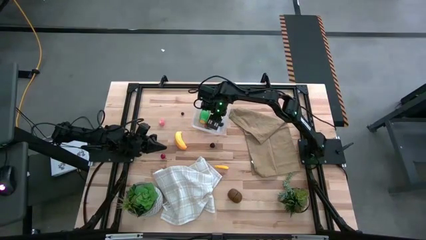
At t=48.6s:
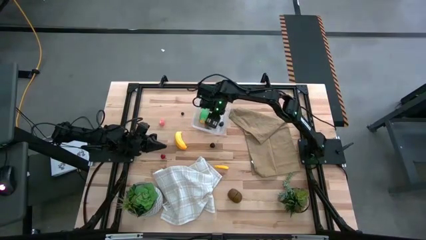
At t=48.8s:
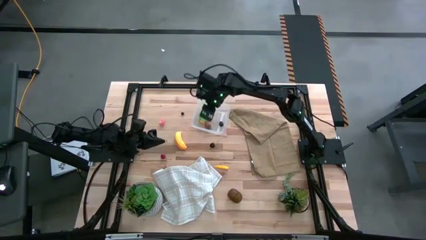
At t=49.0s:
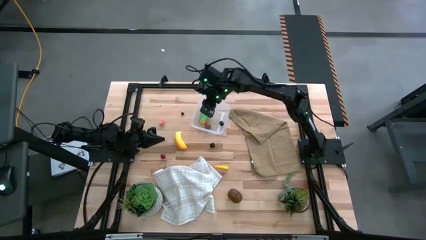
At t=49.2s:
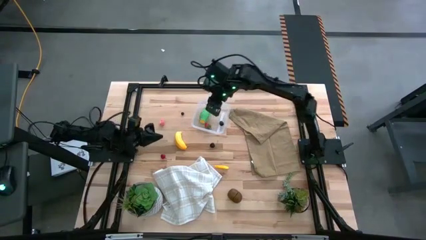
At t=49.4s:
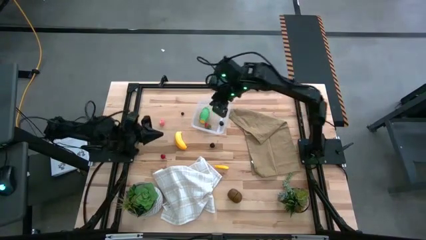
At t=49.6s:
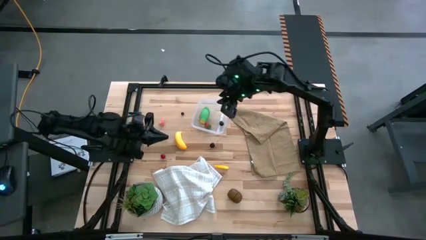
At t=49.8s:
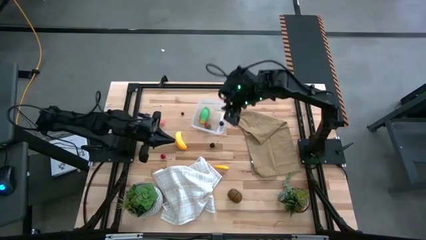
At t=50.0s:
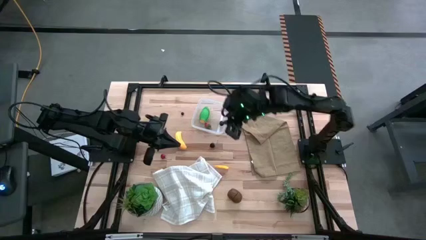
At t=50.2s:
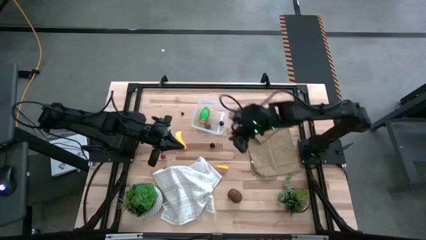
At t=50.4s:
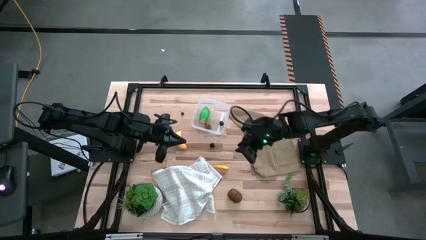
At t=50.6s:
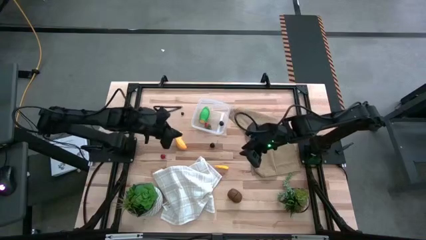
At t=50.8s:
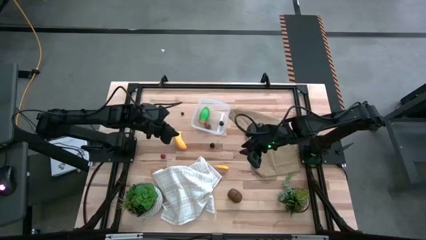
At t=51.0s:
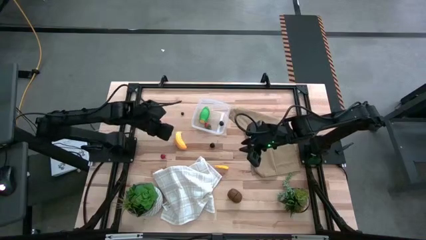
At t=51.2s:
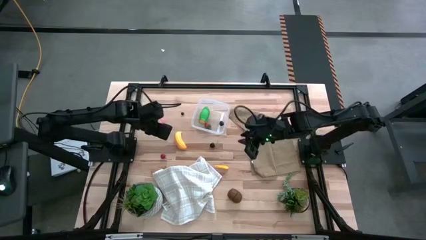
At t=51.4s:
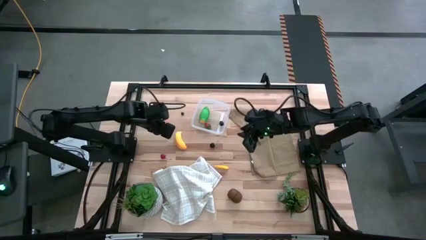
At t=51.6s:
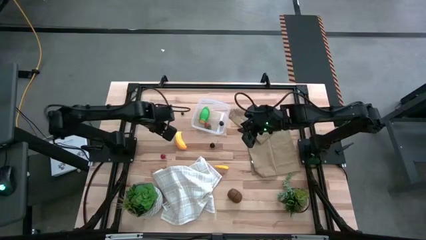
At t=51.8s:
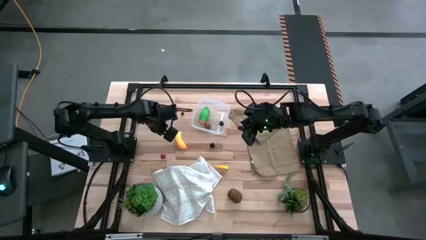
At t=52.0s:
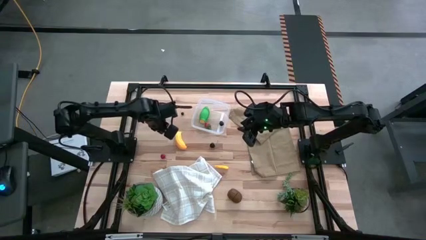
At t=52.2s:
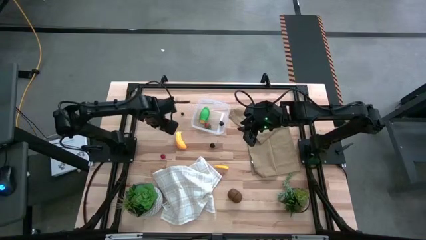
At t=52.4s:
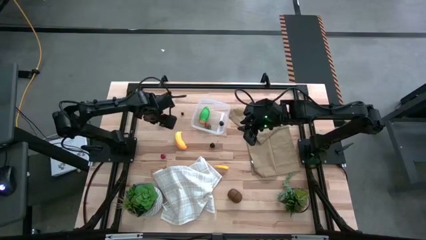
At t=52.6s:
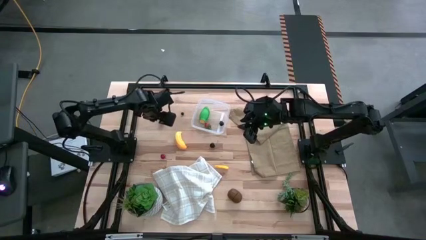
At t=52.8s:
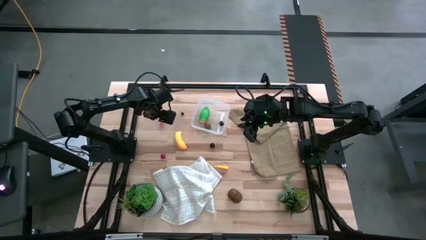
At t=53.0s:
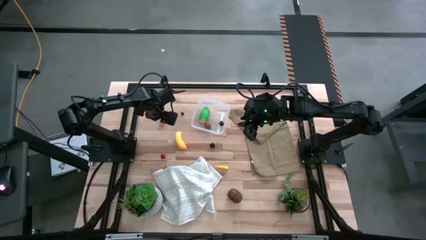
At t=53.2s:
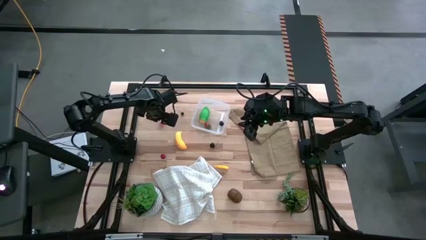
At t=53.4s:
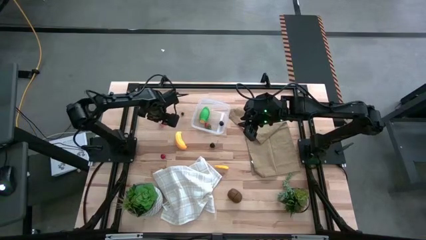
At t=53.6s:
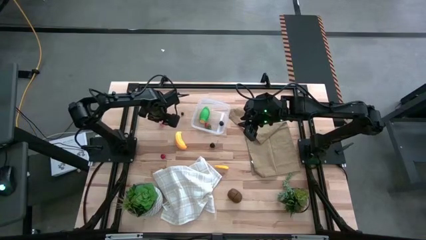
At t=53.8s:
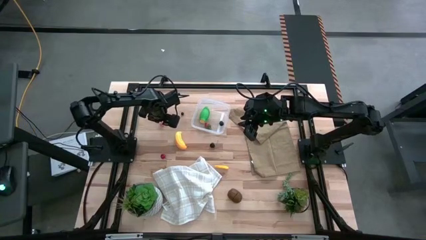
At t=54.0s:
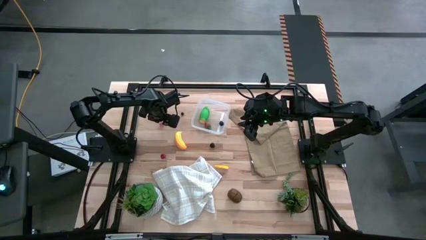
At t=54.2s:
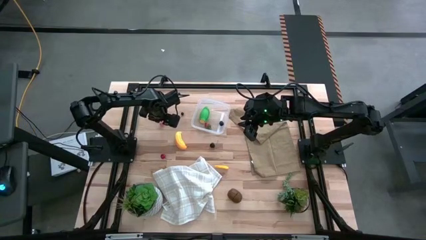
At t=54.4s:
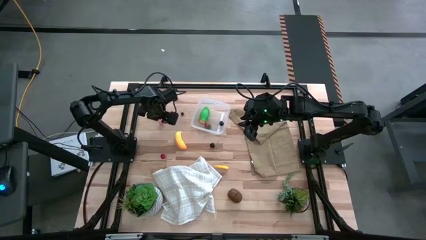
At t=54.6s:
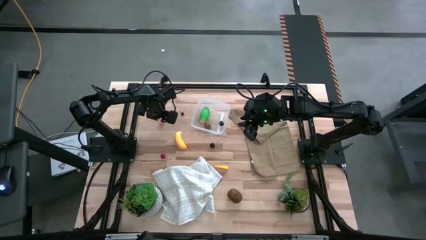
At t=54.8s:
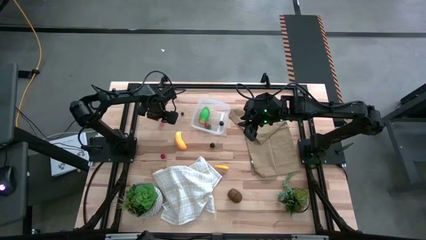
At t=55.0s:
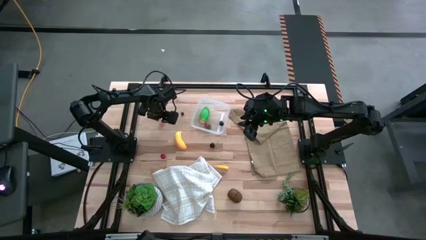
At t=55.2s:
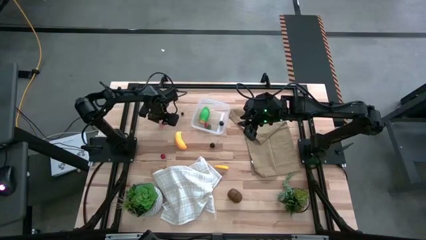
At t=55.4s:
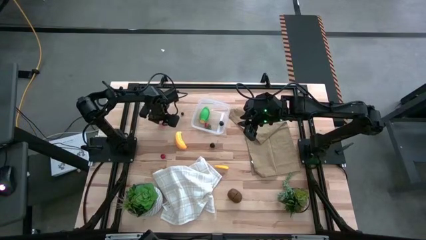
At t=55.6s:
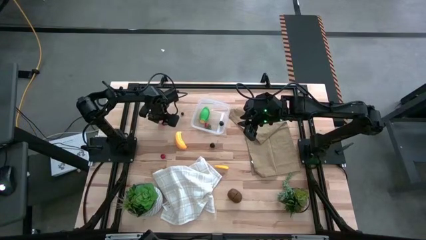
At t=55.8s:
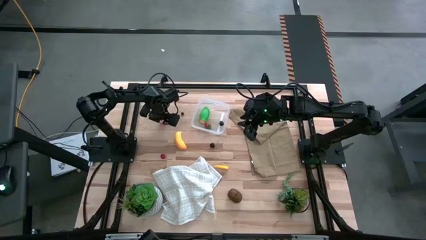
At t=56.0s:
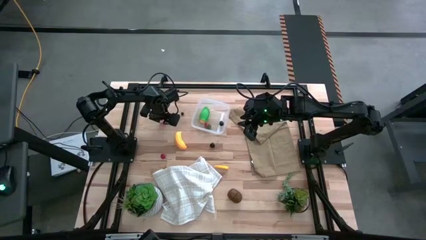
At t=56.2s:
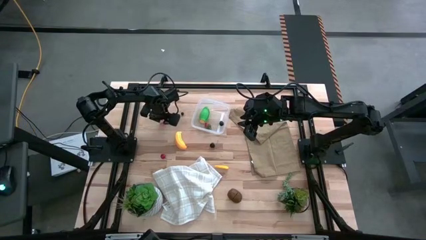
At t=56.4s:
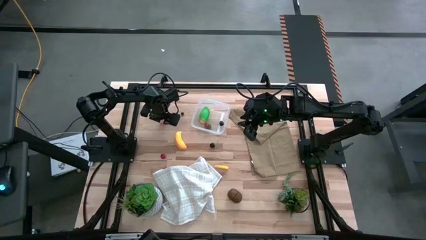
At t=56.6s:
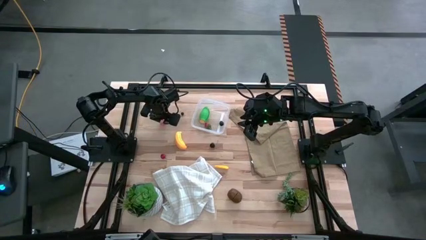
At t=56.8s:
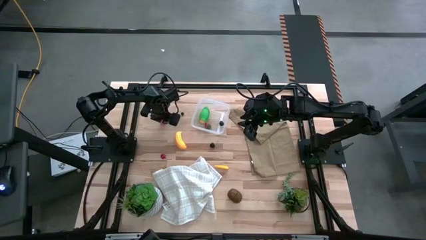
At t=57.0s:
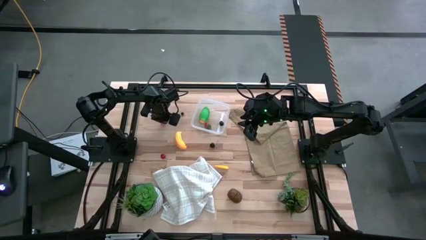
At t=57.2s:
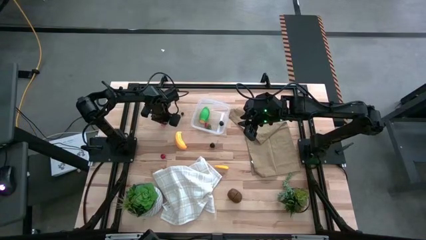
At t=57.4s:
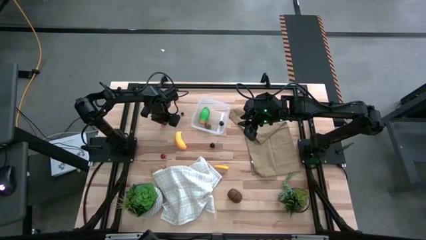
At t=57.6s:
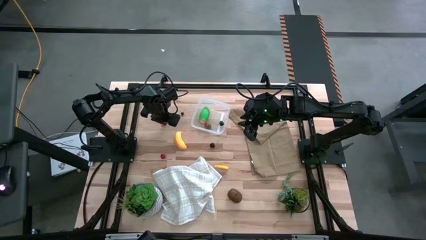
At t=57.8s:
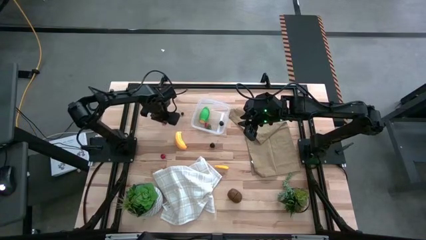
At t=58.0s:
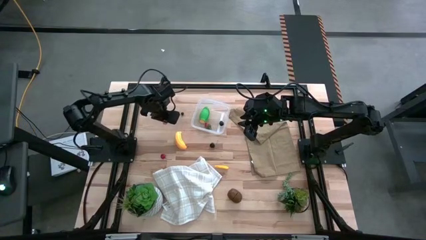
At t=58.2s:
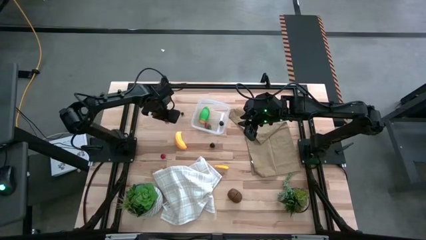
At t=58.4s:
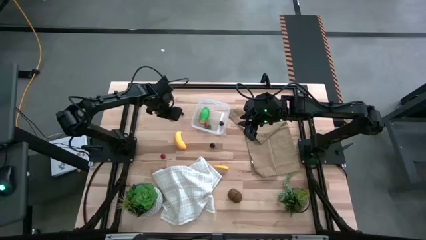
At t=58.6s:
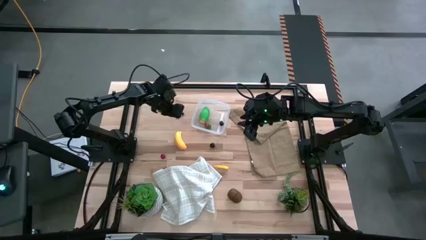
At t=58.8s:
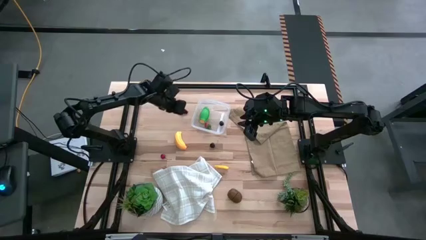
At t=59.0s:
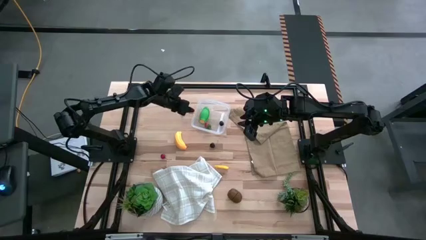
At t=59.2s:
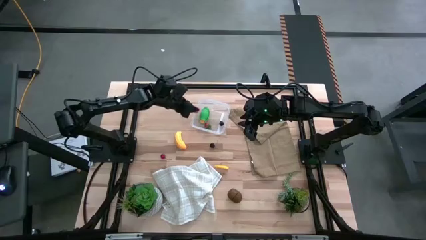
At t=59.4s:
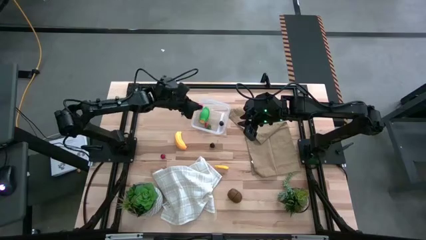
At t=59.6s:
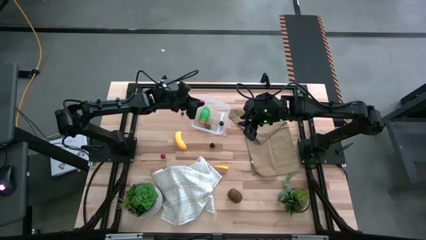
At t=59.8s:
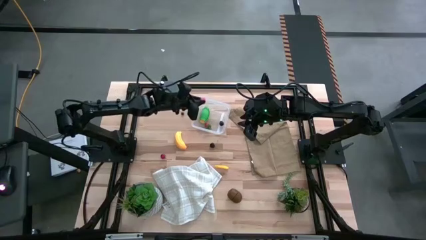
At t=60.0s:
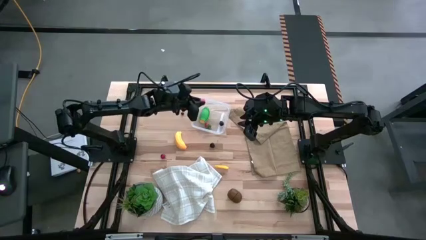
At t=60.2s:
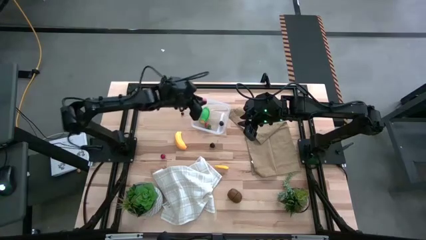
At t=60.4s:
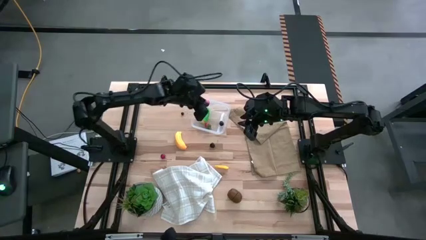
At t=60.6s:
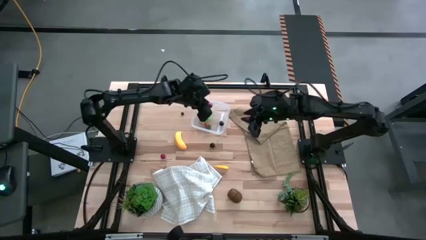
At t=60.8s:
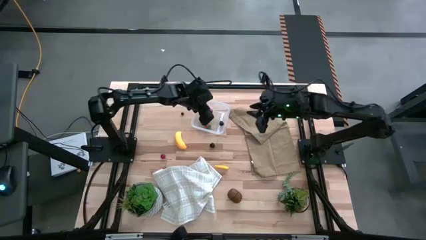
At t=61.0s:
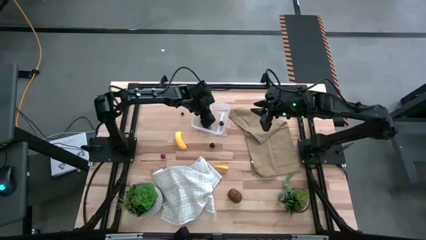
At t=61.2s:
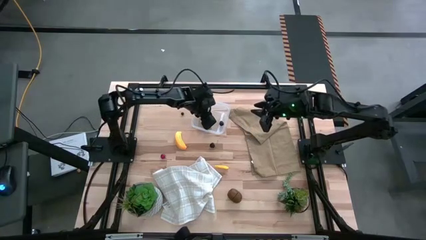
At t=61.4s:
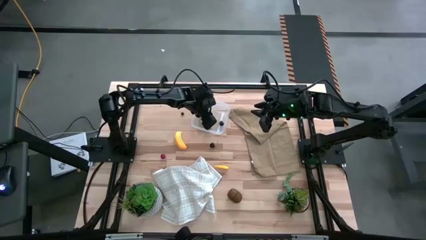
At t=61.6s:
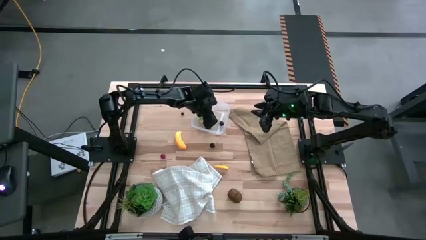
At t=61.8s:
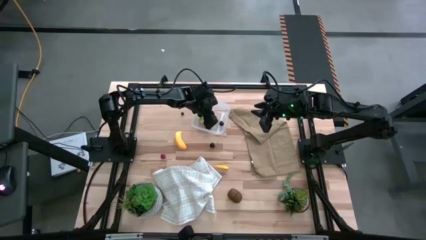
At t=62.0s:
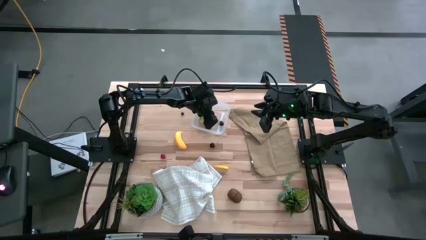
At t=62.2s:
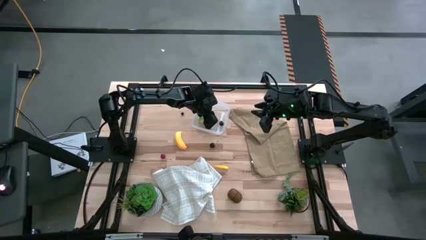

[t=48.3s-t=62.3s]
Task: Pick and placing Produce into tupperware
Put the pink peach into the transparent bin
